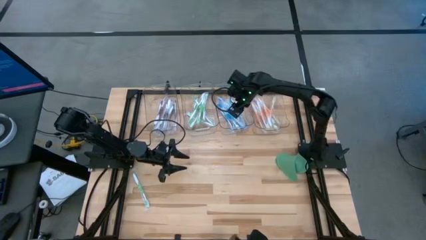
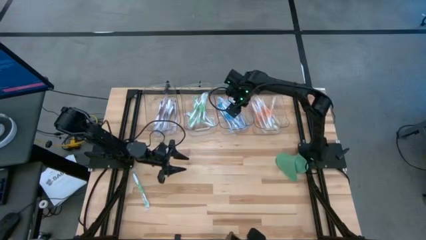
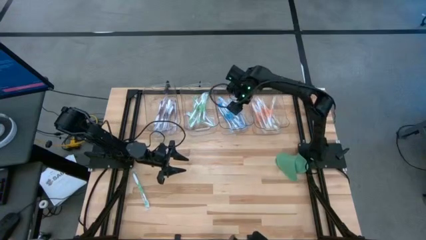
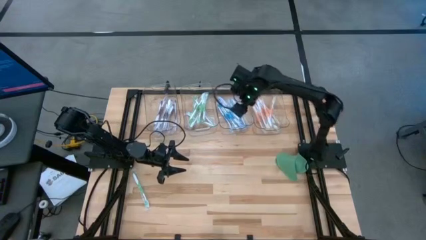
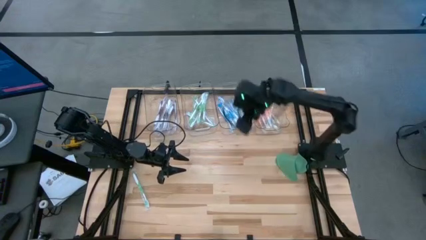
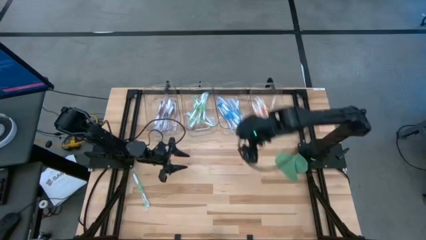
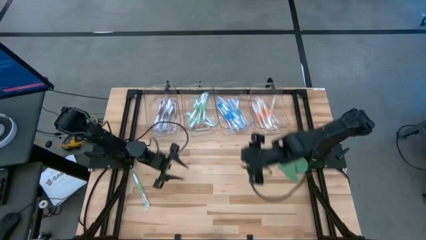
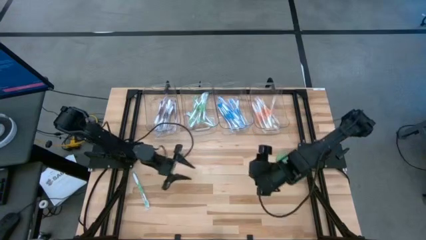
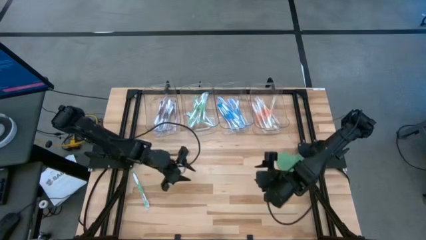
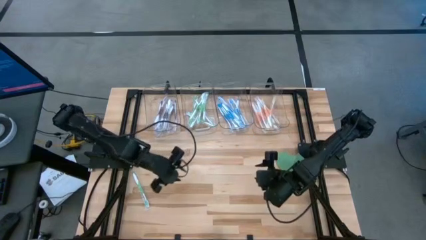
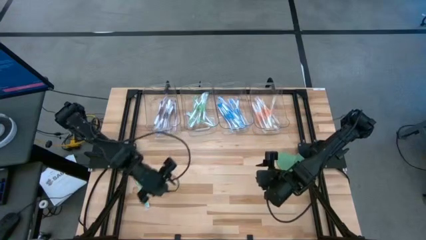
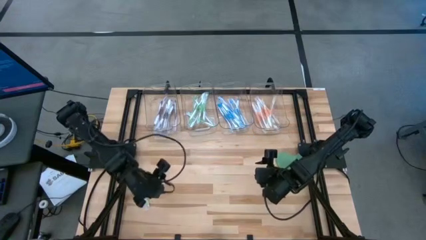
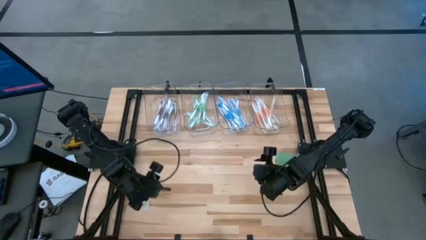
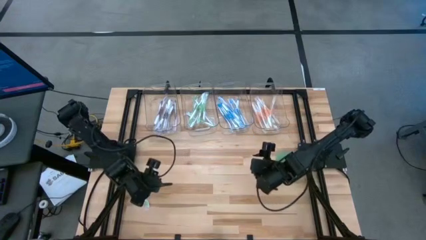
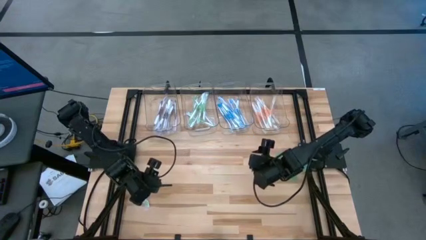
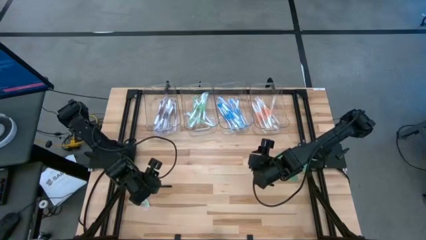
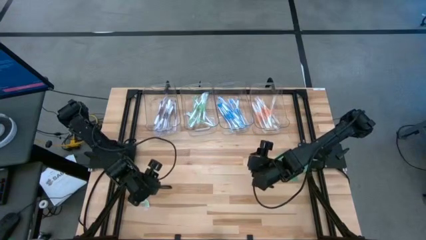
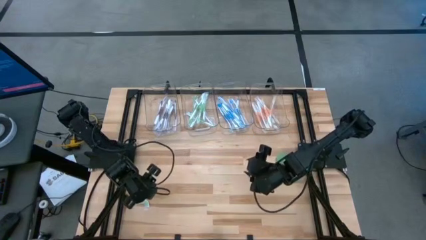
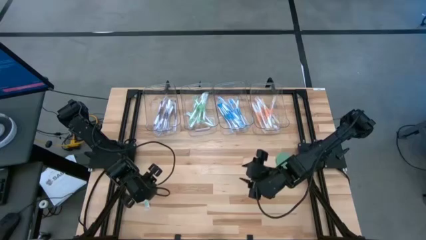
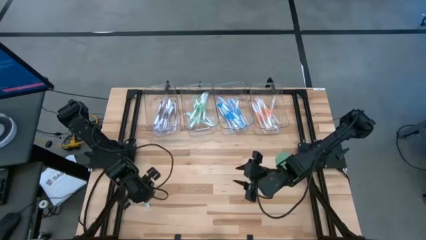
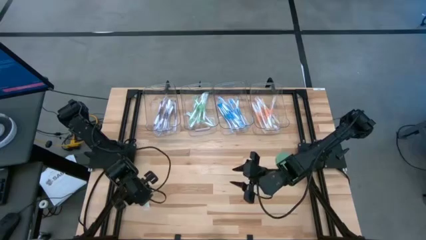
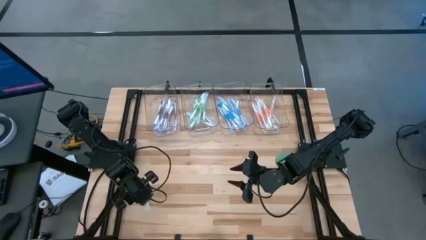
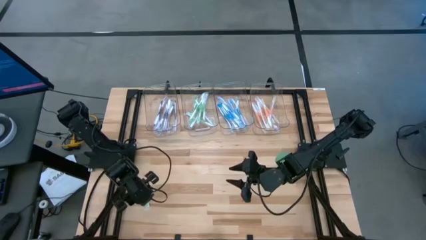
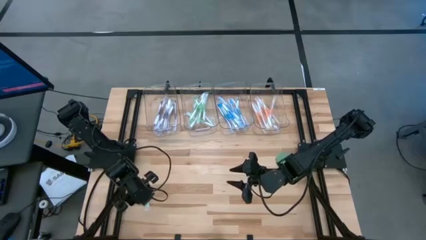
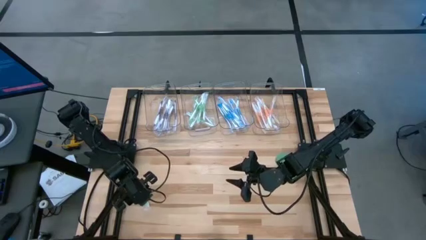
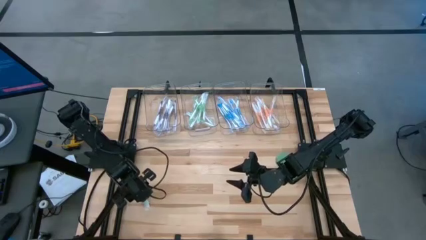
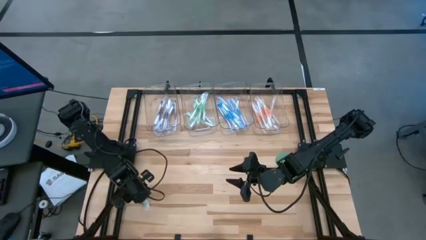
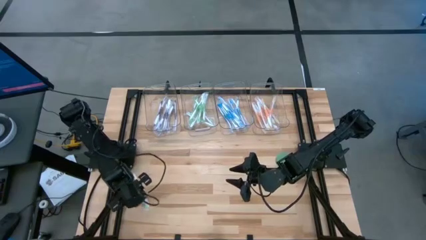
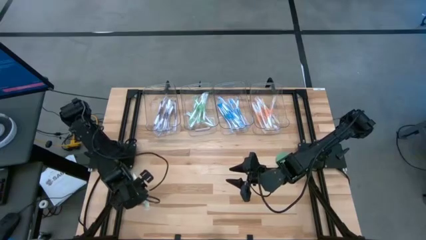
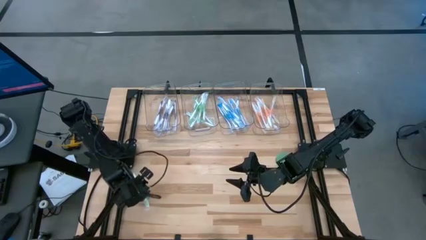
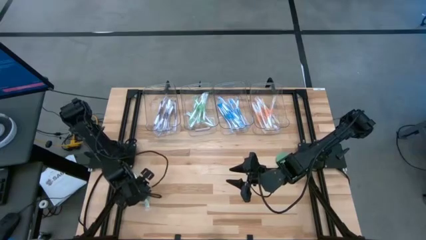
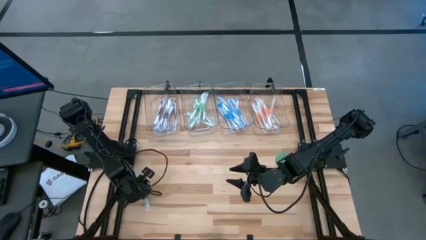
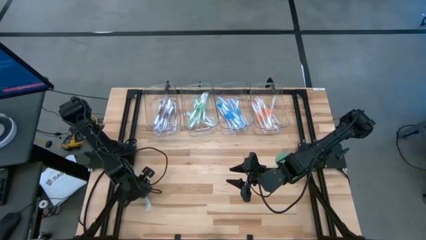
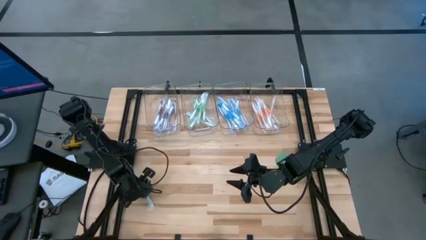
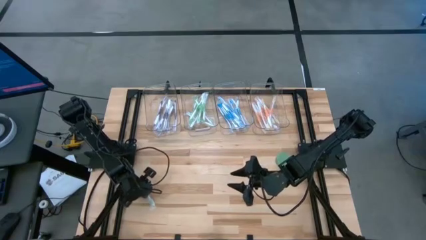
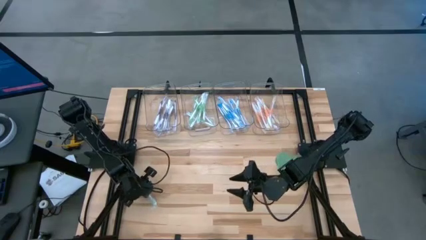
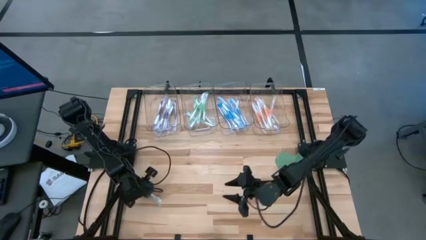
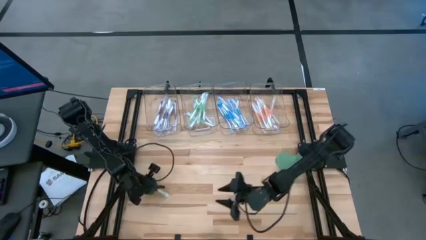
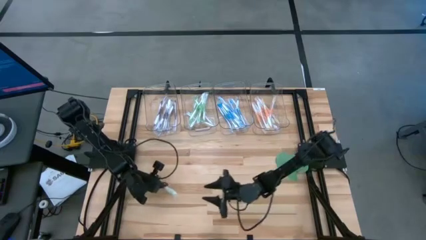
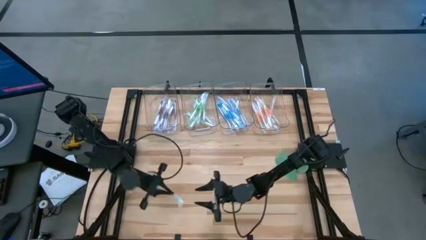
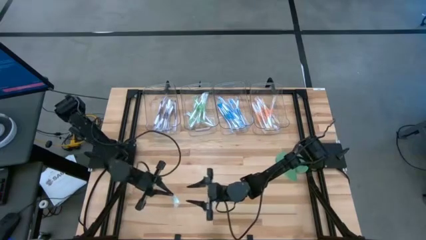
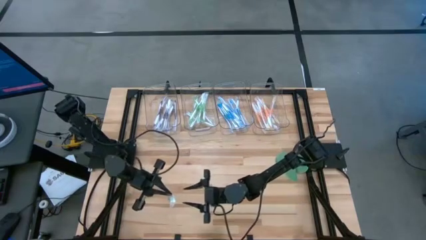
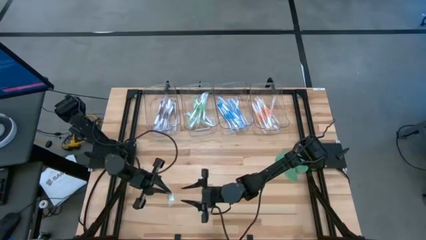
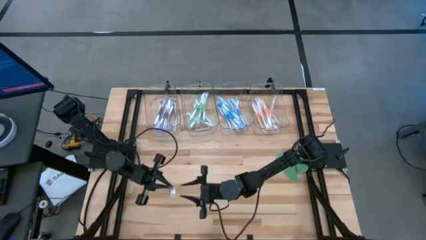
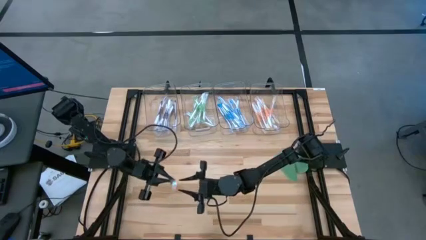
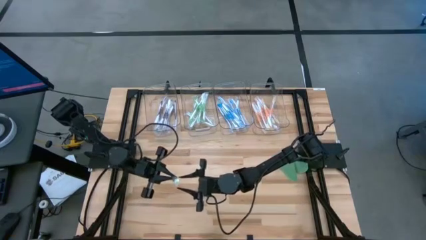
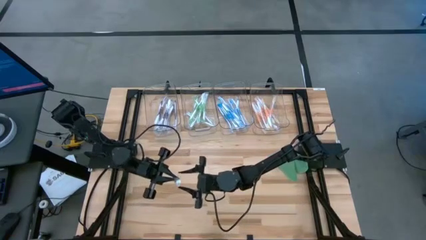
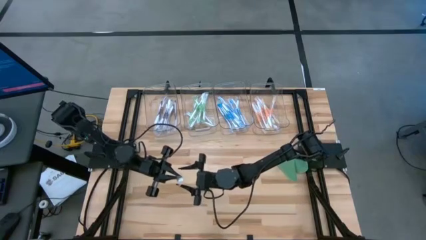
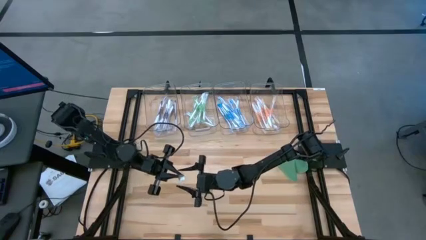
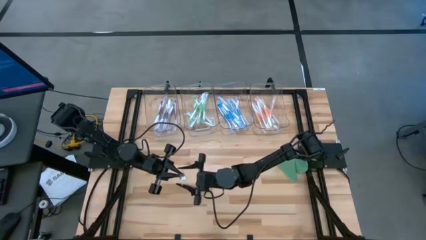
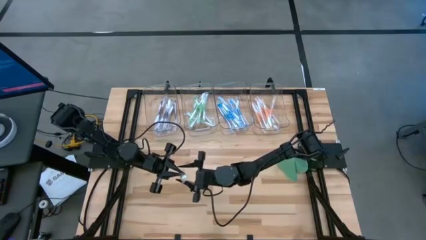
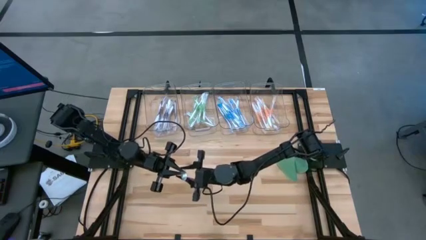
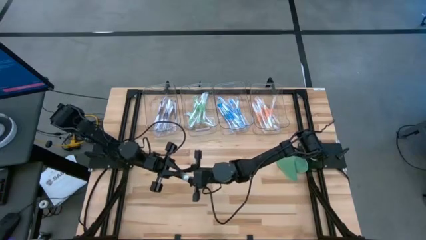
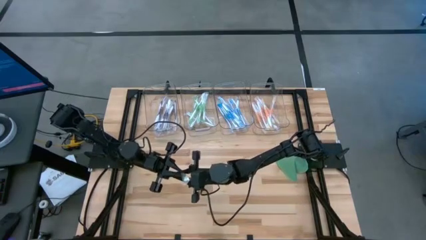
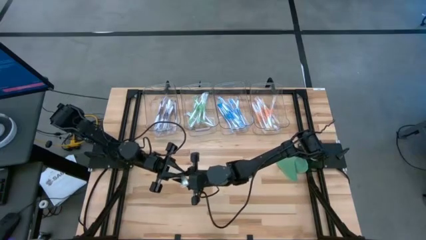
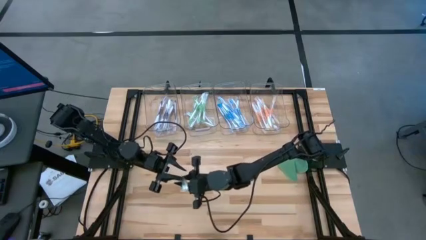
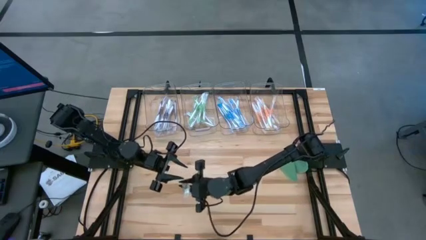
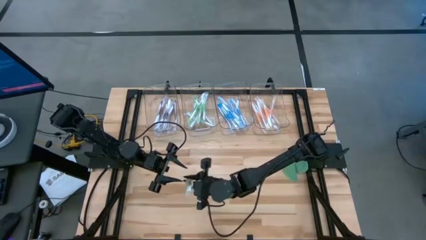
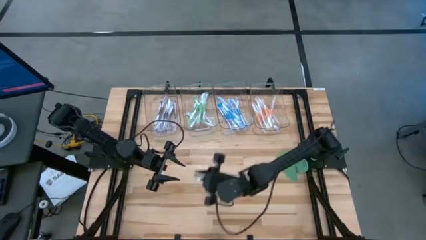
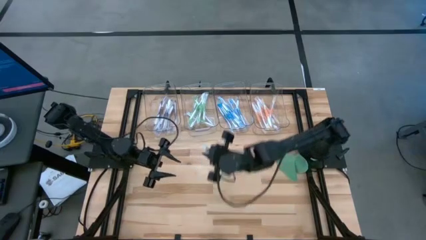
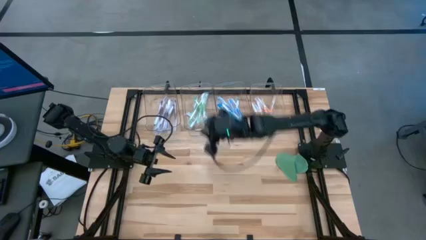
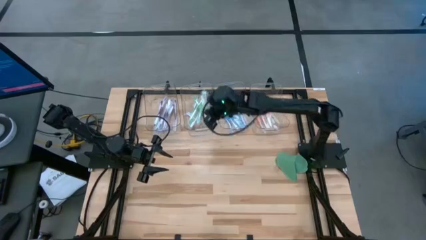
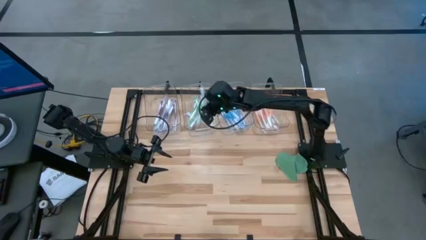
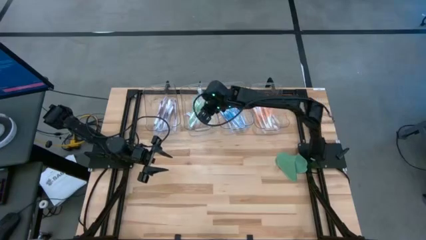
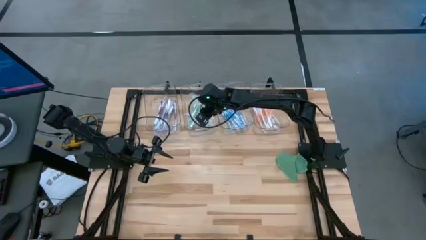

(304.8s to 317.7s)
Task: Pick & Place Toothbrushes
Put the green toothbrush into the middle left transparent bin

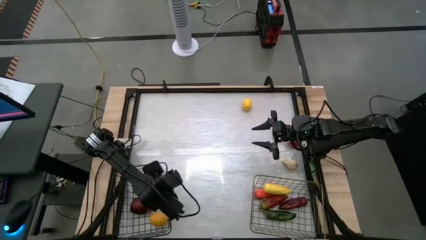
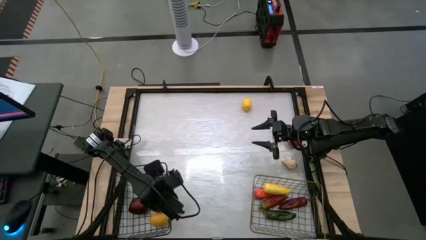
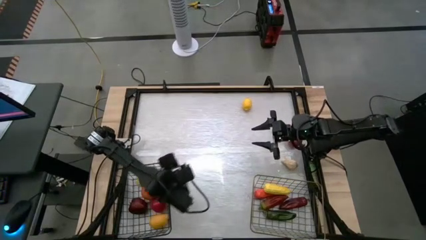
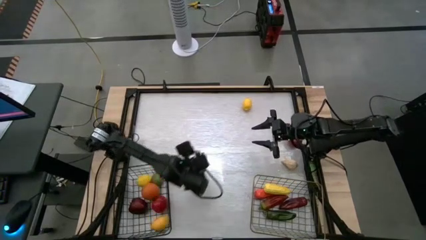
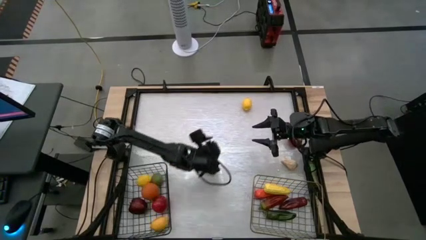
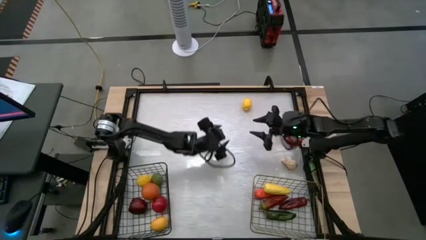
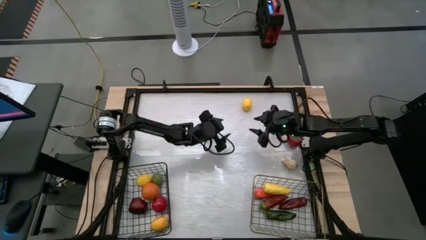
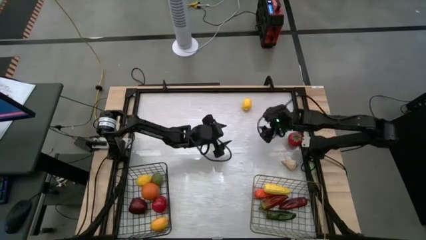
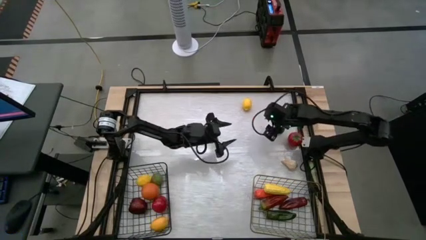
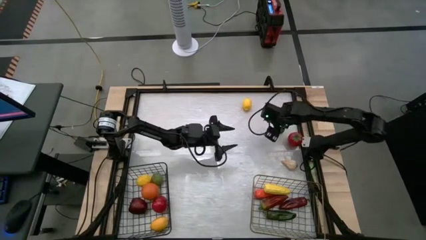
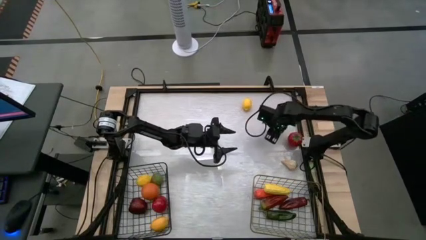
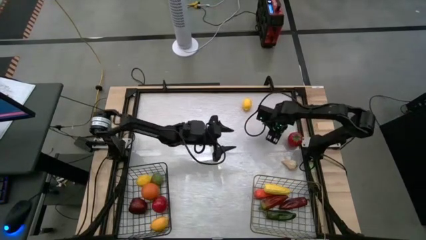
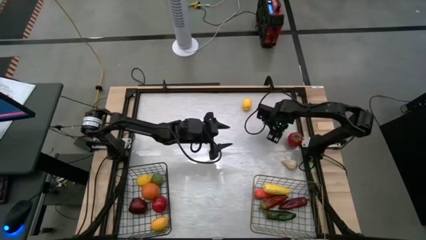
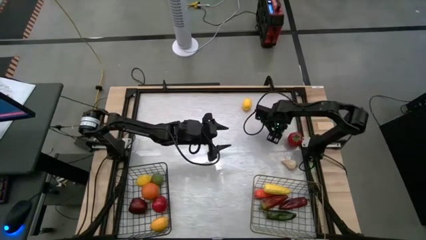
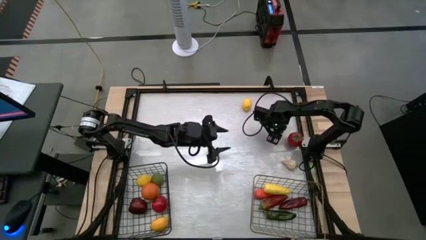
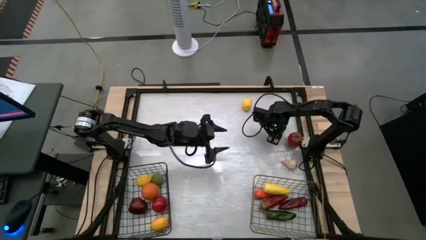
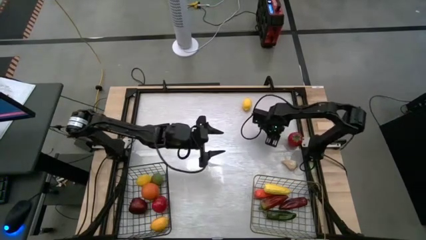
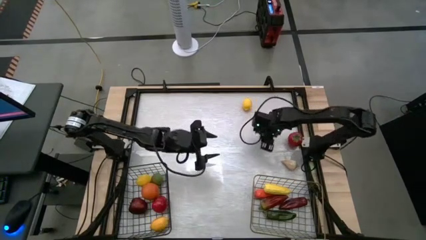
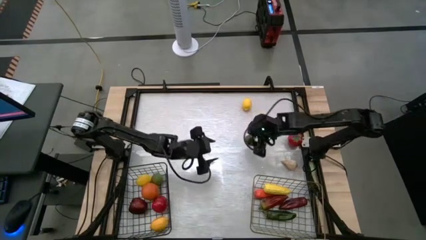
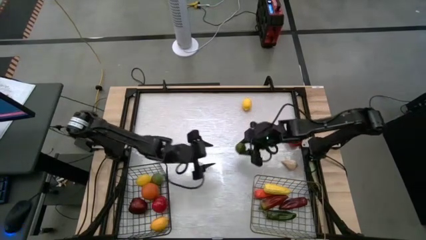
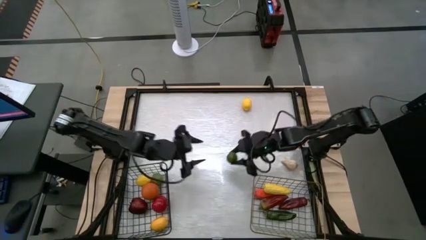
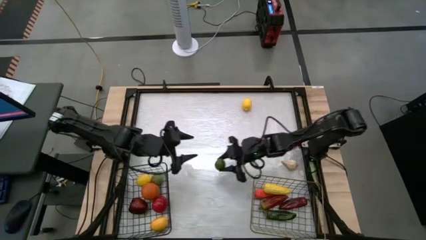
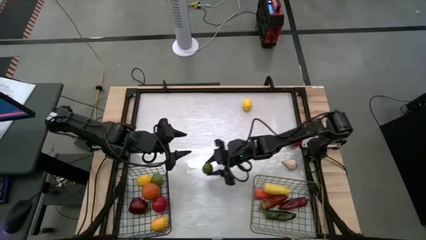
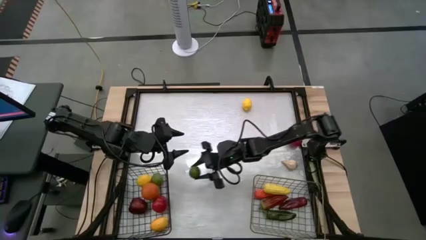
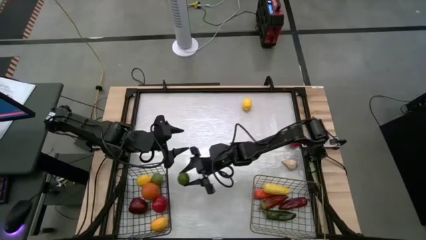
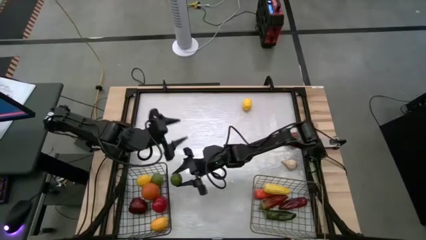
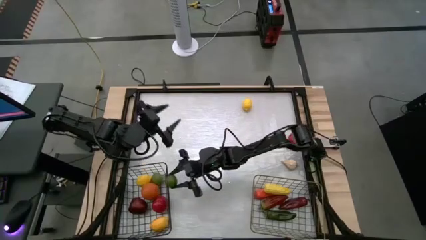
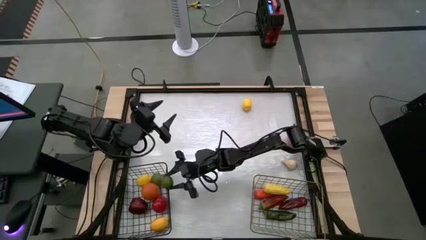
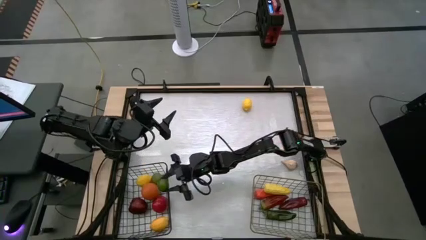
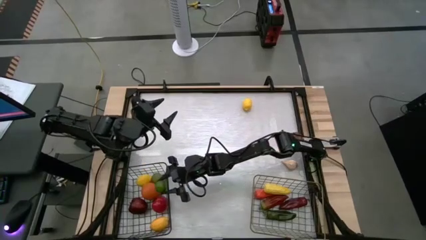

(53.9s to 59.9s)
Task: Sort produce into baskets
Put the lime into the black wire basket
